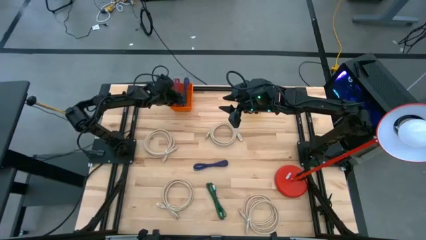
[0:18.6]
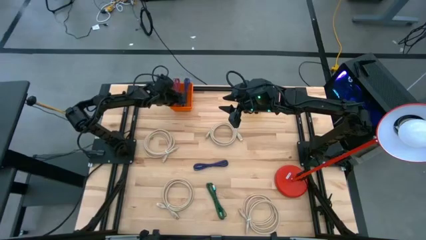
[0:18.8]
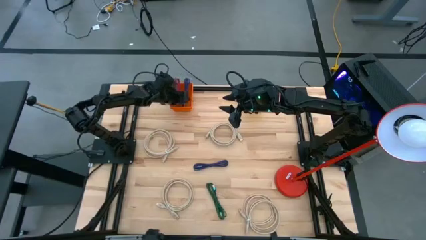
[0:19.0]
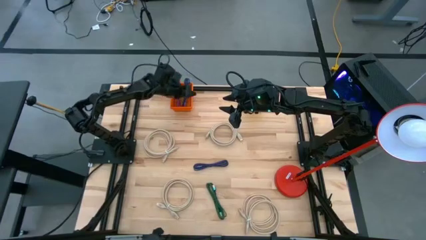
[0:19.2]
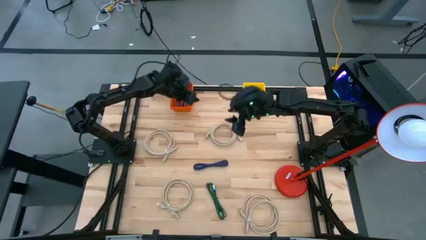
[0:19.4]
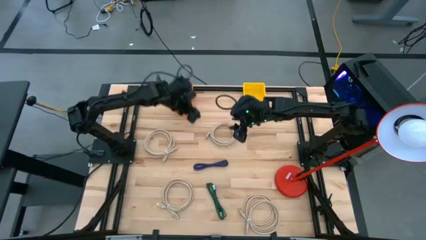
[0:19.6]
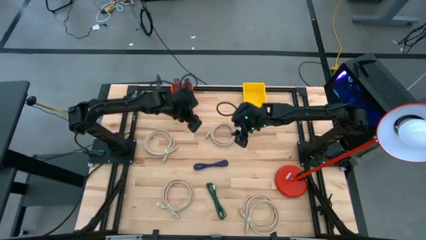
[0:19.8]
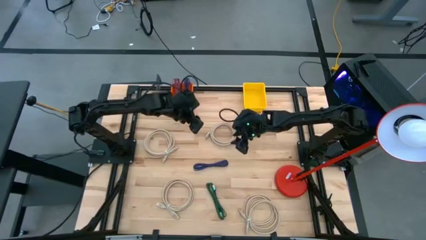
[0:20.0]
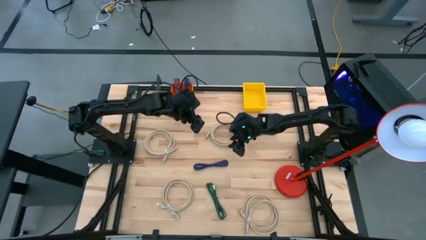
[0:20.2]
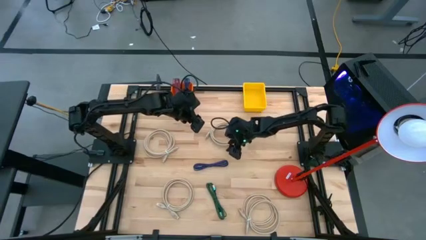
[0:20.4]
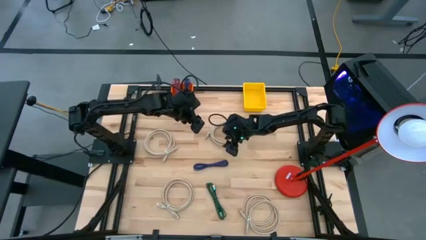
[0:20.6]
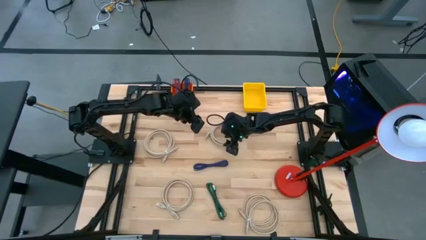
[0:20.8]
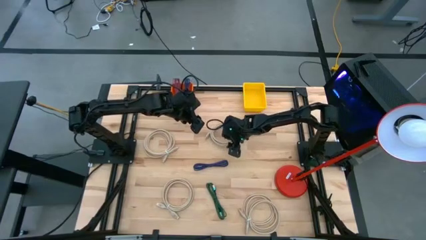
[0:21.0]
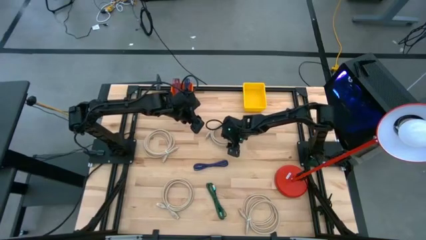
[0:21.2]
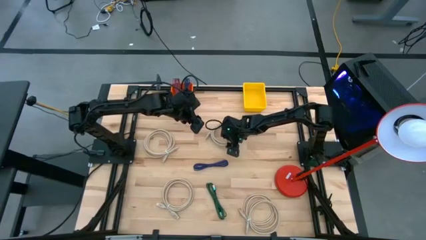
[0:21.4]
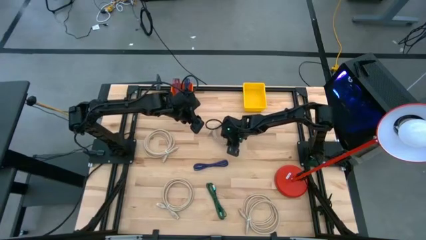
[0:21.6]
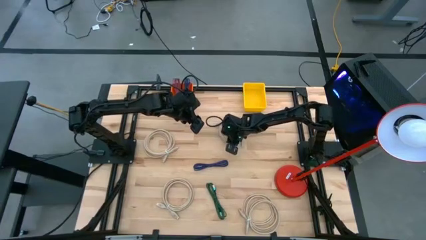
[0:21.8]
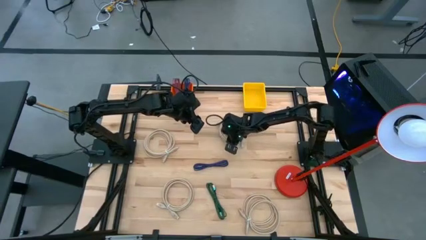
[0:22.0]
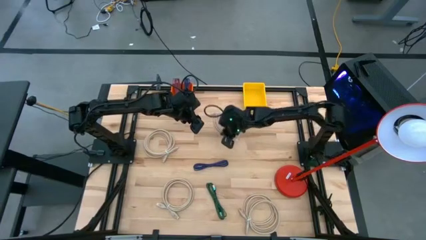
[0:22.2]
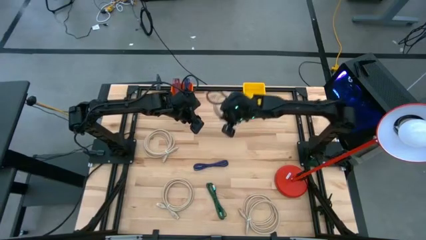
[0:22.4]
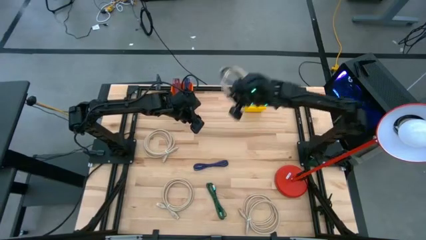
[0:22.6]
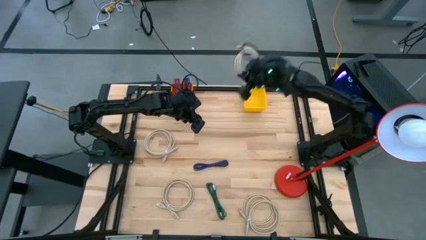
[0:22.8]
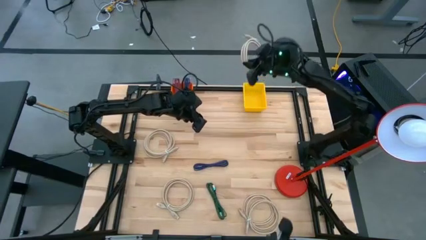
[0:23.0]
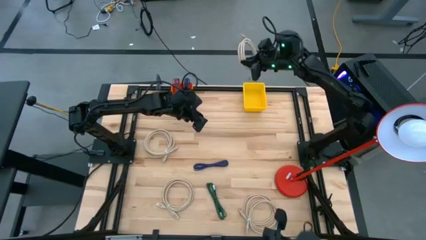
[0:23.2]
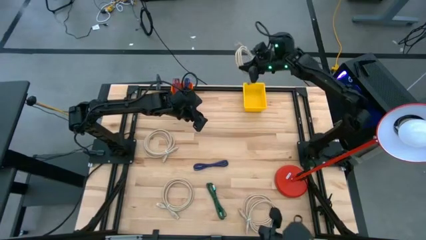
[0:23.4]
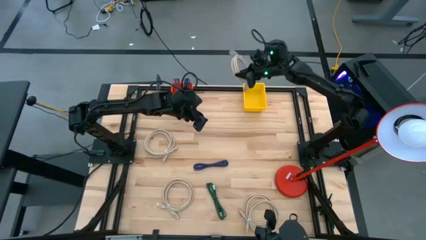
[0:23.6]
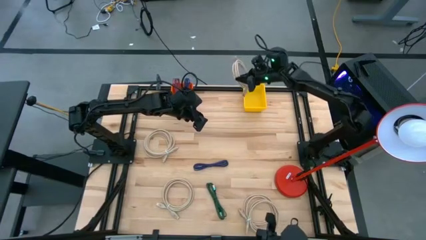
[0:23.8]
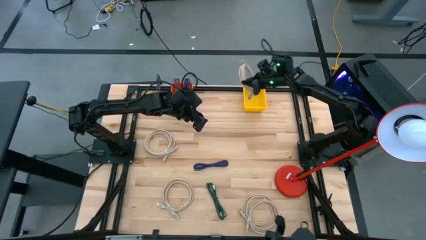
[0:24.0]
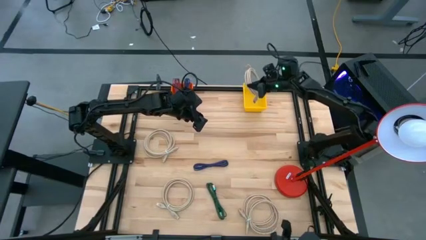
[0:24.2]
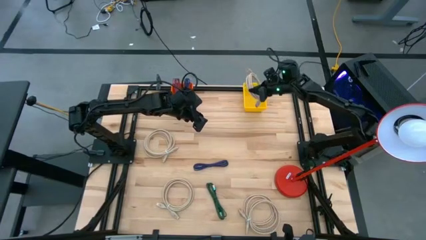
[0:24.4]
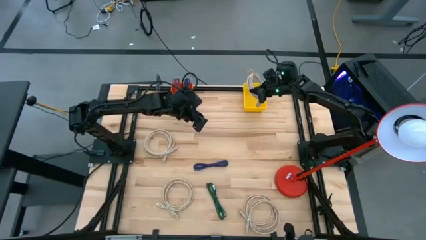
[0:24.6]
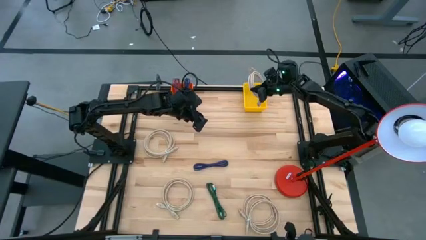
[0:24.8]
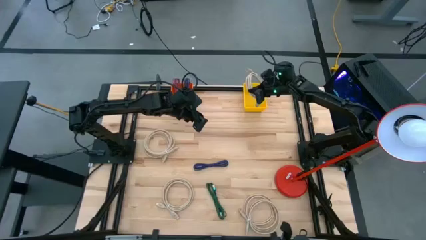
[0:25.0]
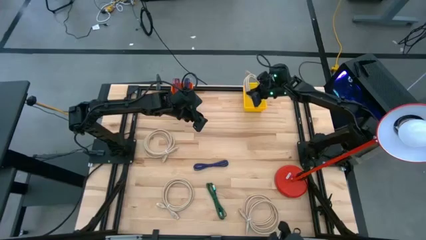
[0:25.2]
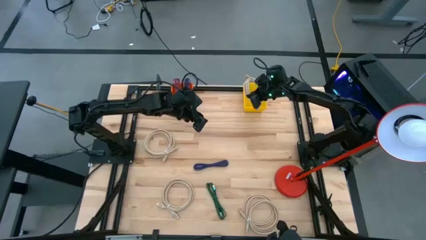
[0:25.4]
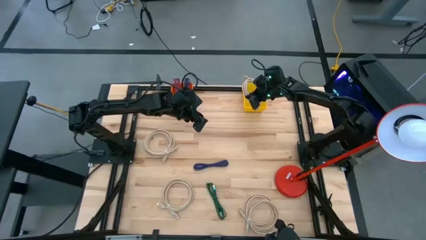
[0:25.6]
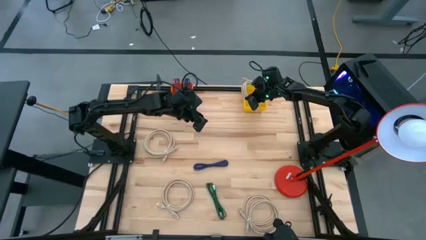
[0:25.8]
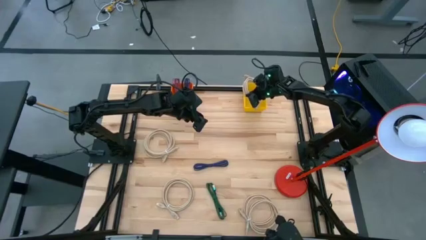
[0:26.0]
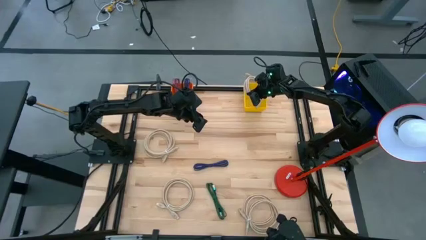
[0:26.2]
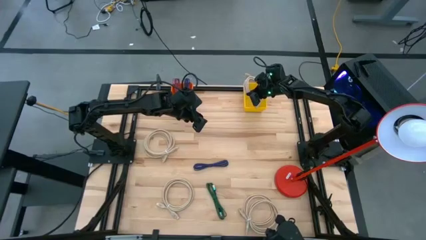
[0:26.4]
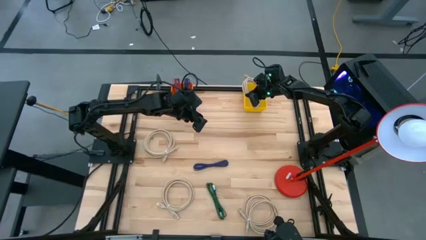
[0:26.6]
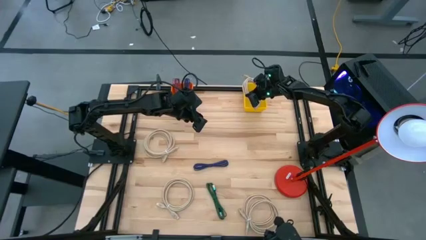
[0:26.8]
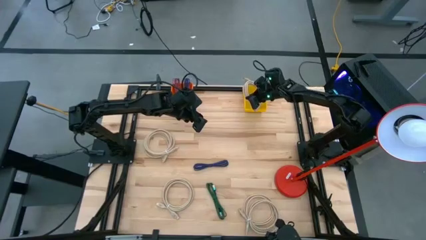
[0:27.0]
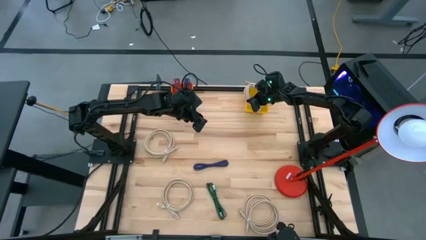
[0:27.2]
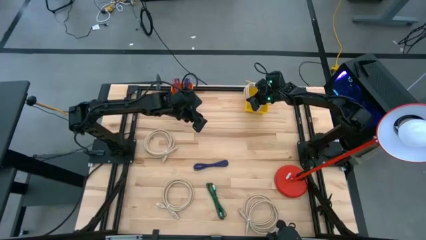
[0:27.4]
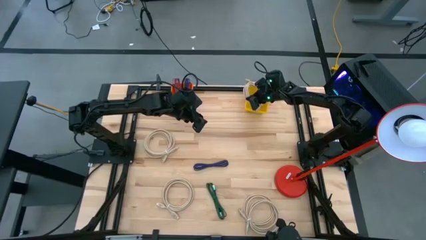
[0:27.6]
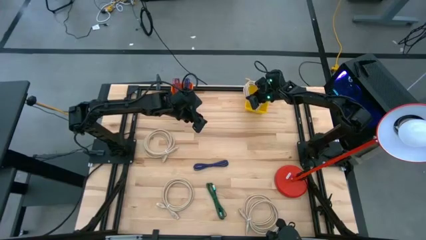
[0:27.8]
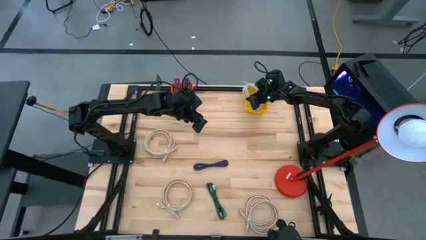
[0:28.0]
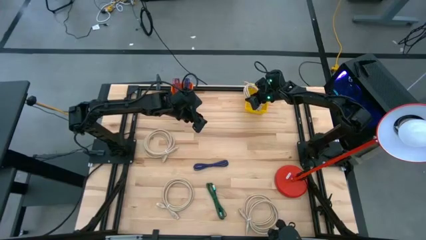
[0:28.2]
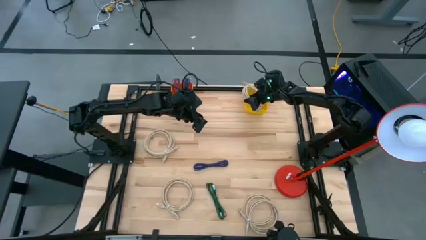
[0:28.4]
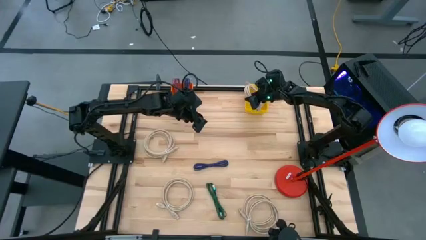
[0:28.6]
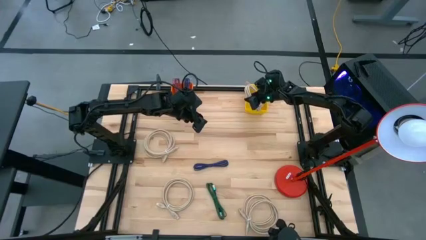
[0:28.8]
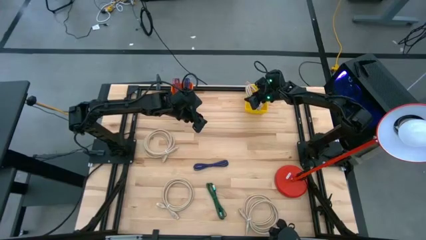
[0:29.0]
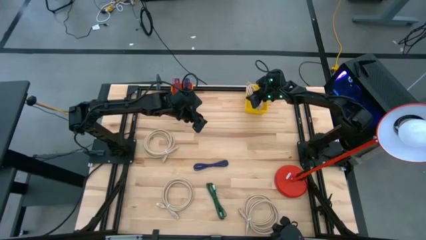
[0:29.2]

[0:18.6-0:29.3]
Task: Pick & Place USB Port
Put the brown HDMI cable into the yellow bin

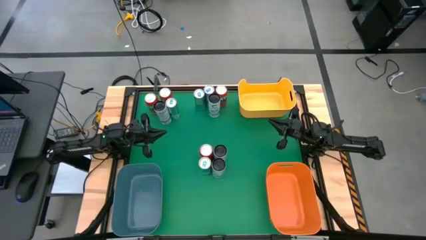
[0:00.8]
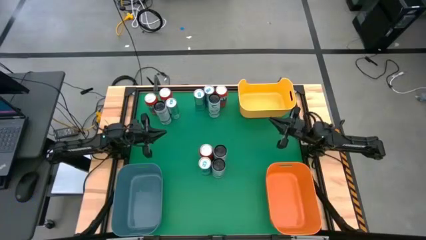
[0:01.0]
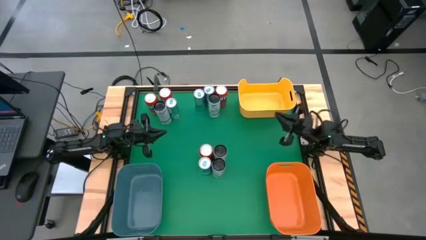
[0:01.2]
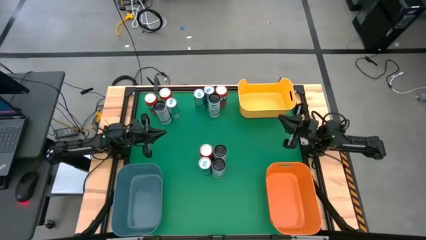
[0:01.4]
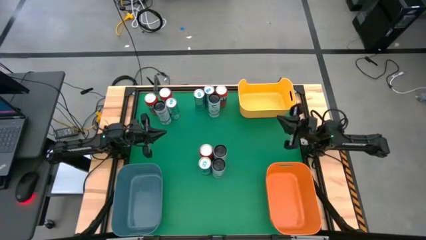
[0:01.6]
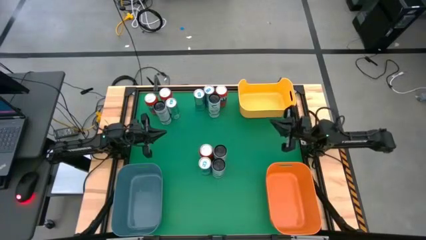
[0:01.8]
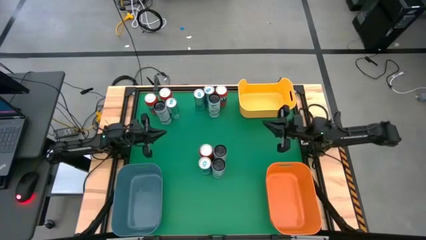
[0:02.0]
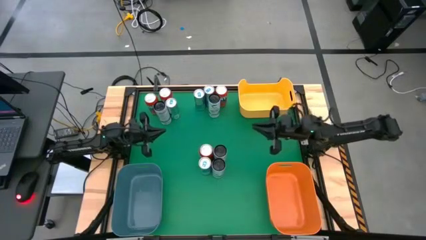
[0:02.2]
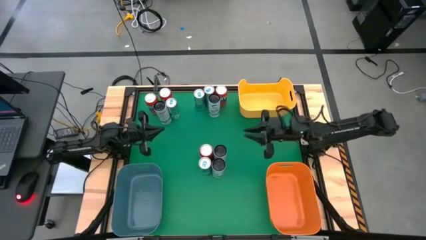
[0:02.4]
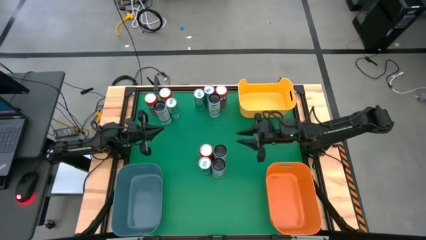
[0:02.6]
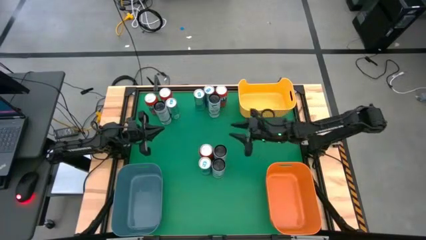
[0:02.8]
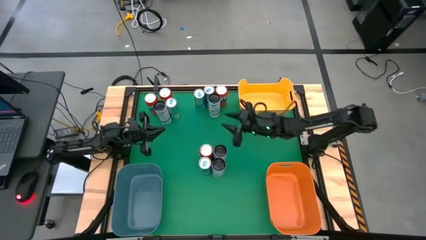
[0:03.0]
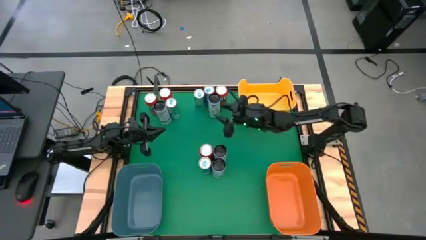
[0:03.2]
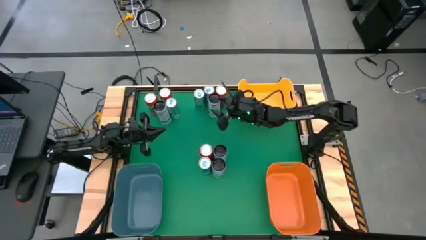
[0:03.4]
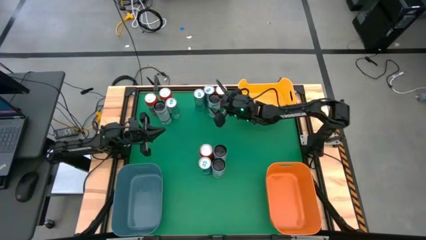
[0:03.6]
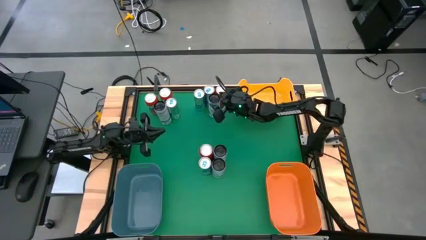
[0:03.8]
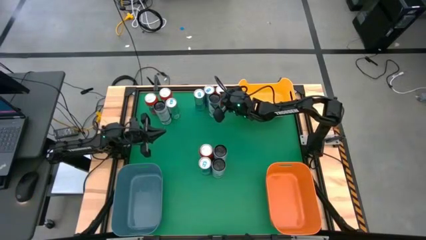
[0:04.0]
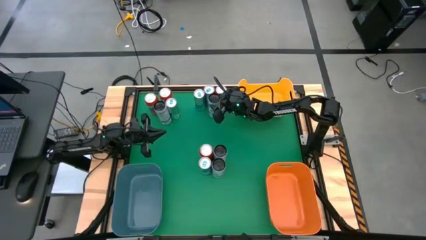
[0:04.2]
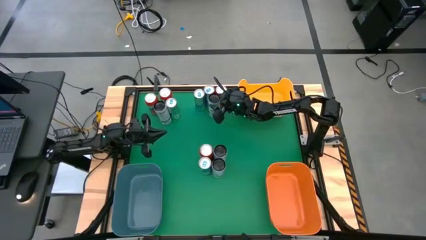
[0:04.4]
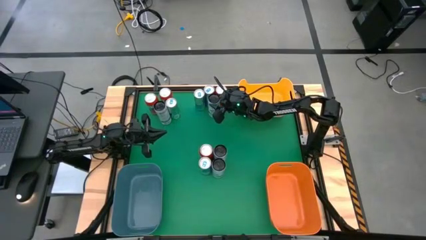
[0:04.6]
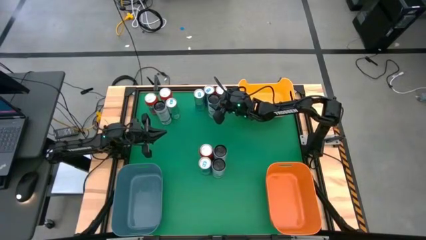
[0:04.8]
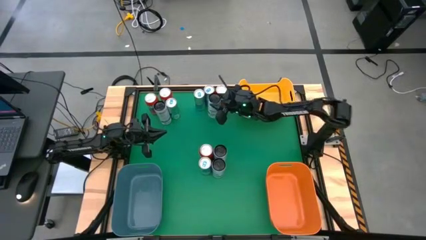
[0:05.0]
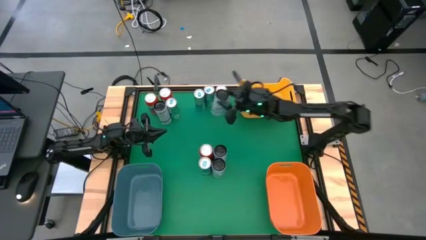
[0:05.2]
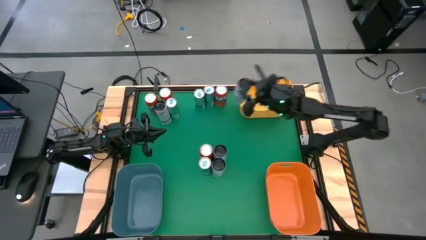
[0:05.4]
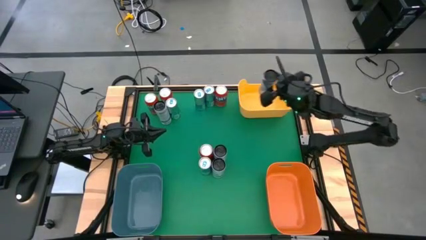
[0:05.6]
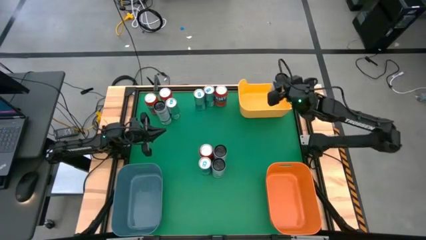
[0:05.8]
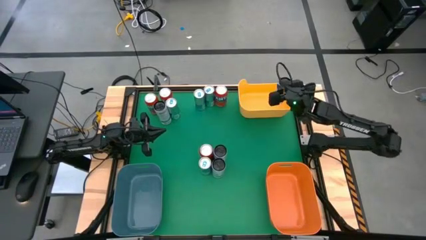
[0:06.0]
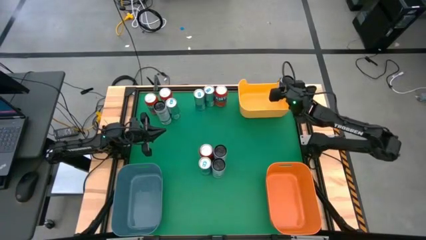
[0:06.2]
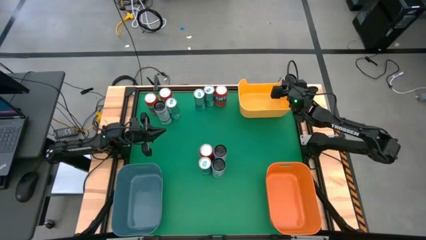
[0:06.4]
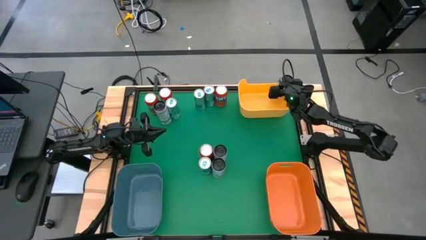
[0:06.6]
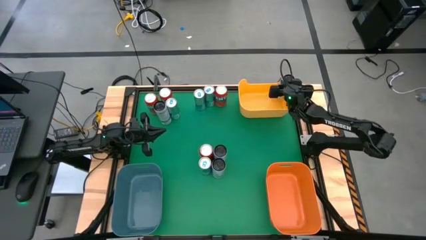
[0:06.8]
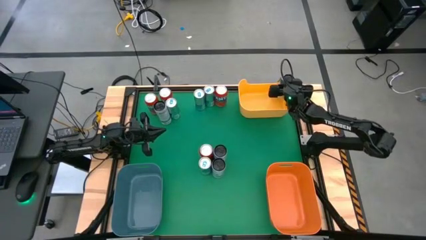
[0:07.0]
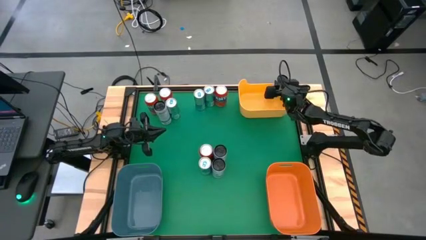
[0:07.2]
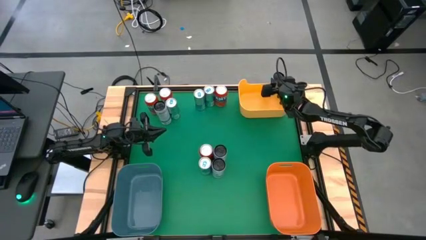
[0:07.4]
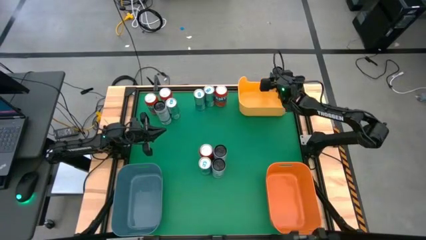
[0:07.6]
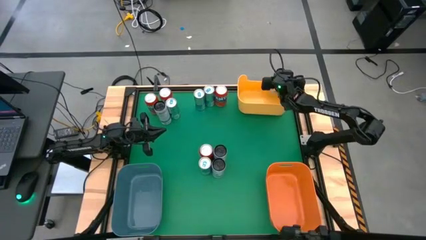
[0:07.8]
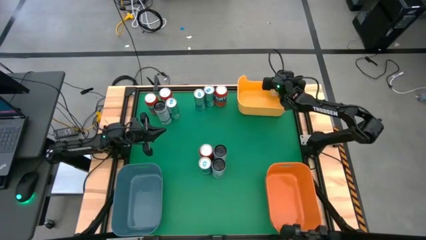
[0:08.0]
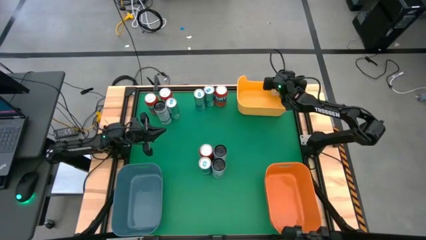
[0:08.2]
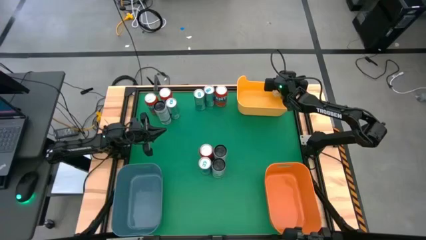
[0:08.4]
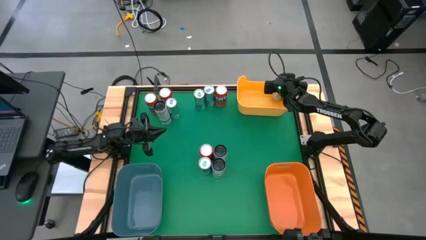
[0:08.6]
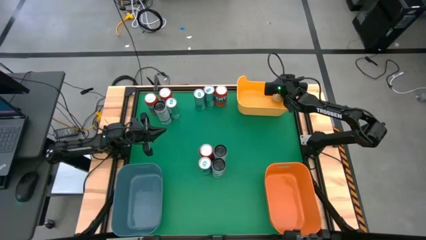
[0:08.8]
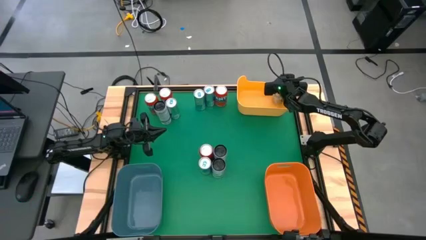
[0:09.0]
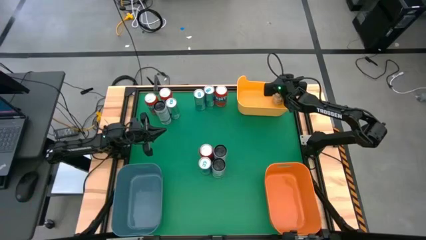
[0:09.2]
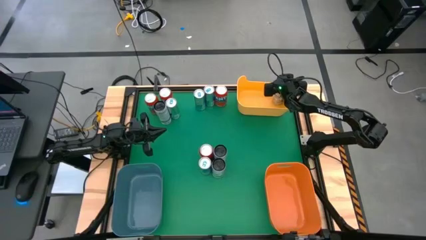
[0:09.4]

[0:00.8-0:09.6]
Task: Sort soda cans
Put the white-blue soda can into the yellow bin
